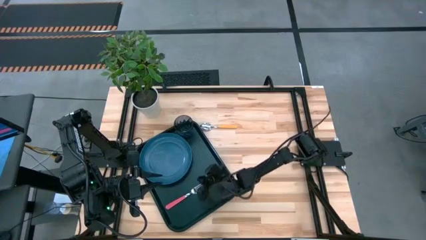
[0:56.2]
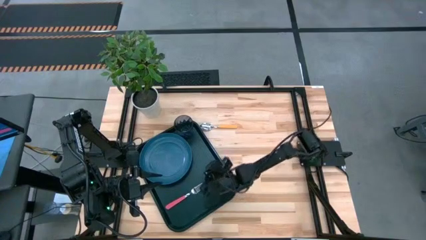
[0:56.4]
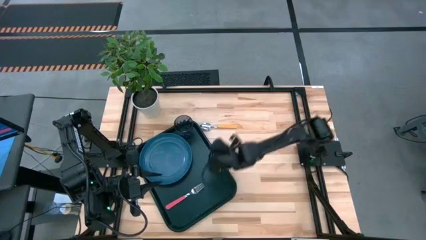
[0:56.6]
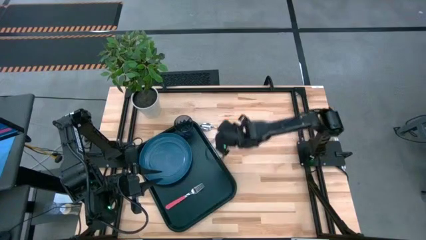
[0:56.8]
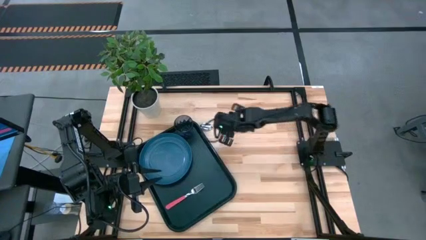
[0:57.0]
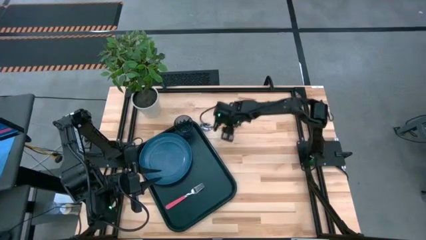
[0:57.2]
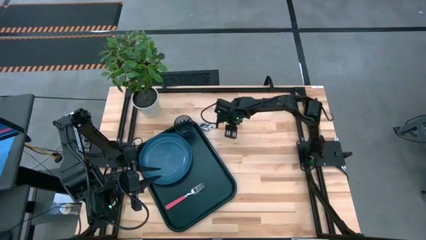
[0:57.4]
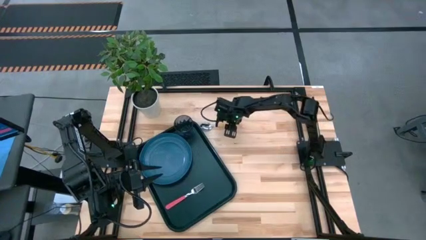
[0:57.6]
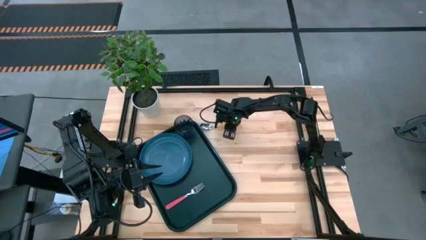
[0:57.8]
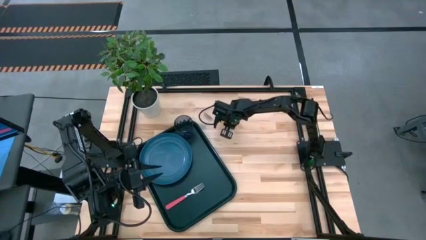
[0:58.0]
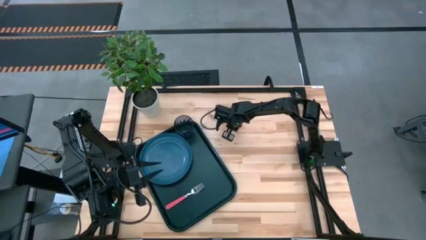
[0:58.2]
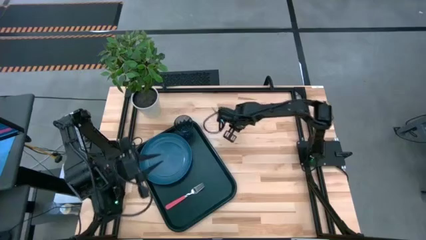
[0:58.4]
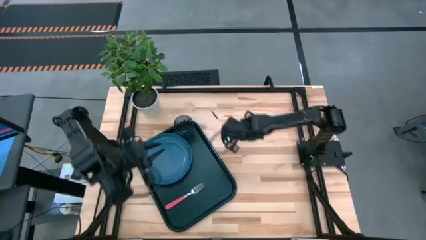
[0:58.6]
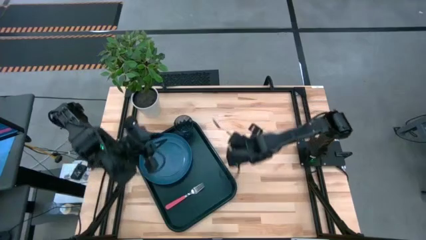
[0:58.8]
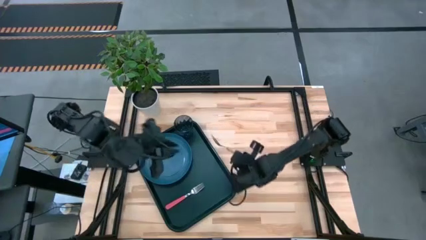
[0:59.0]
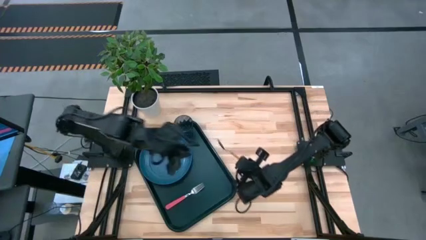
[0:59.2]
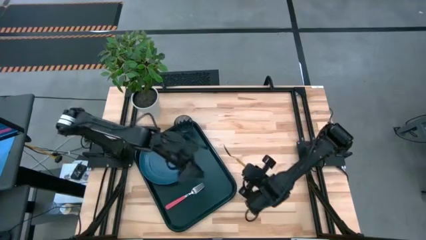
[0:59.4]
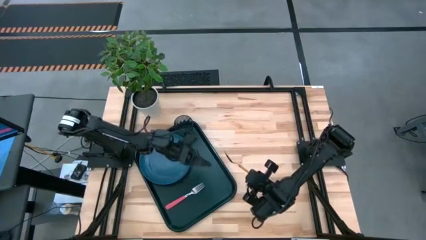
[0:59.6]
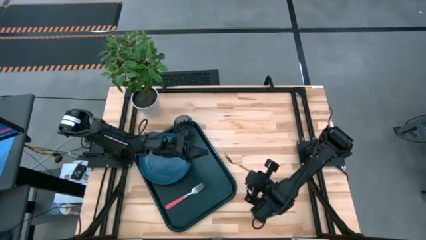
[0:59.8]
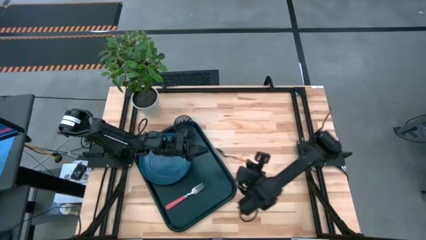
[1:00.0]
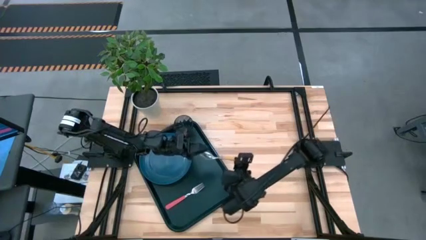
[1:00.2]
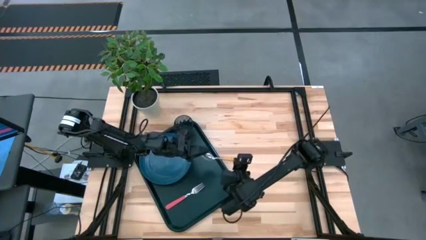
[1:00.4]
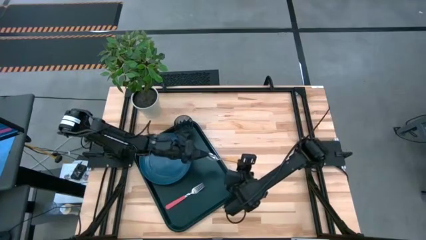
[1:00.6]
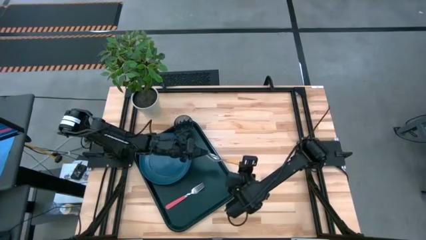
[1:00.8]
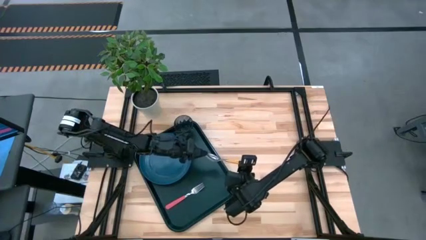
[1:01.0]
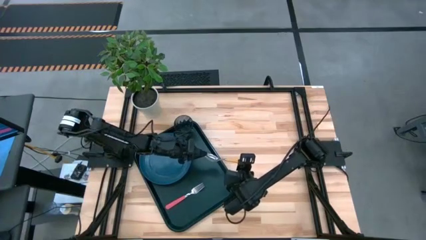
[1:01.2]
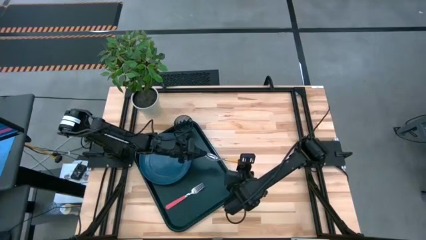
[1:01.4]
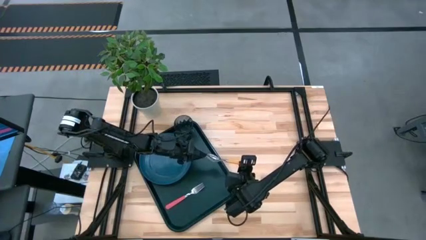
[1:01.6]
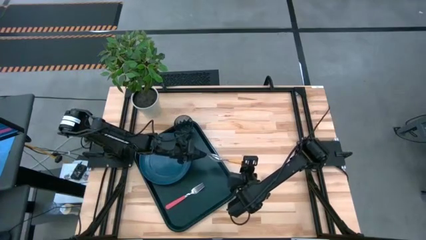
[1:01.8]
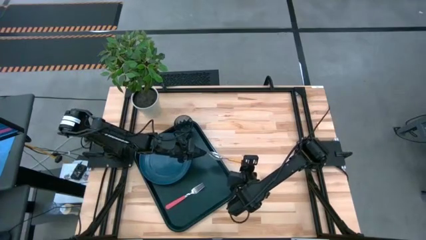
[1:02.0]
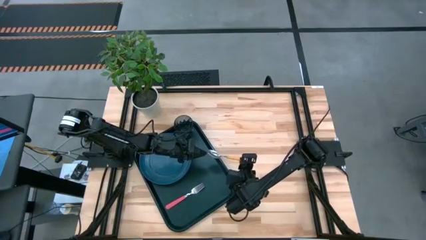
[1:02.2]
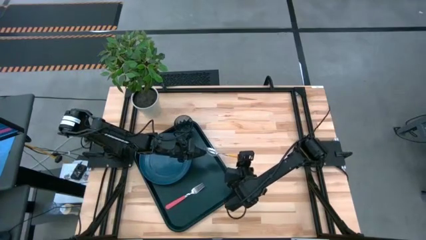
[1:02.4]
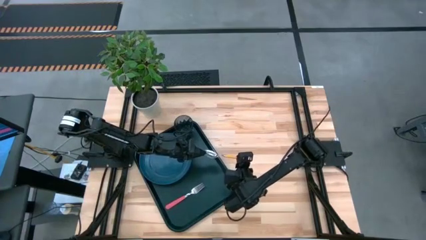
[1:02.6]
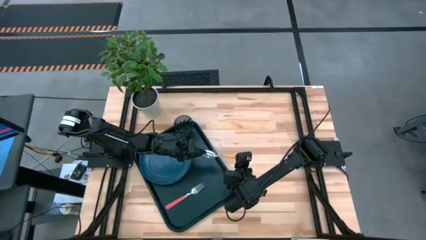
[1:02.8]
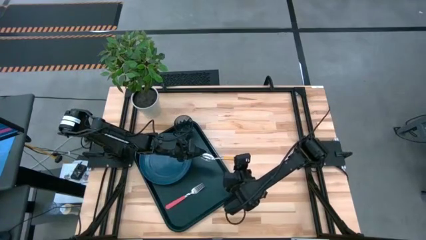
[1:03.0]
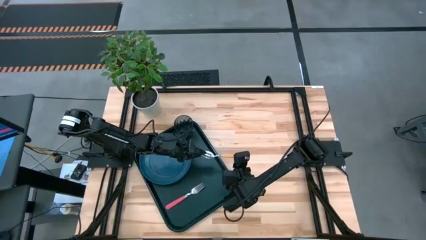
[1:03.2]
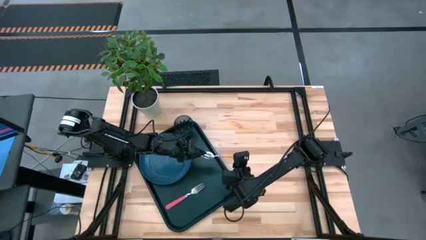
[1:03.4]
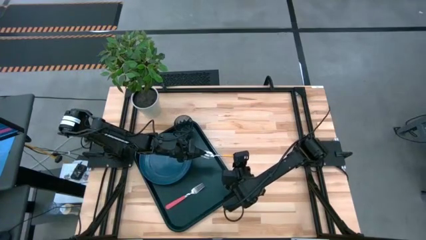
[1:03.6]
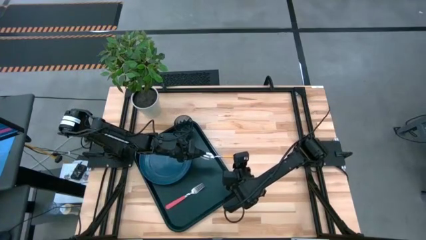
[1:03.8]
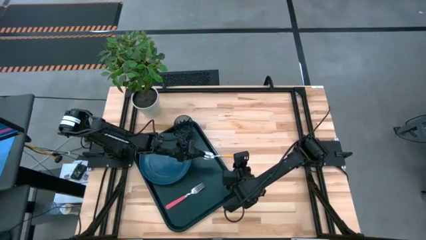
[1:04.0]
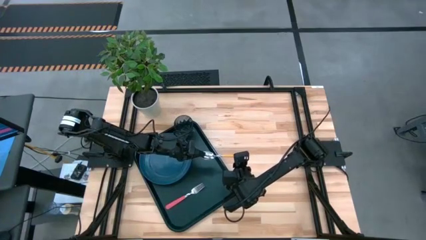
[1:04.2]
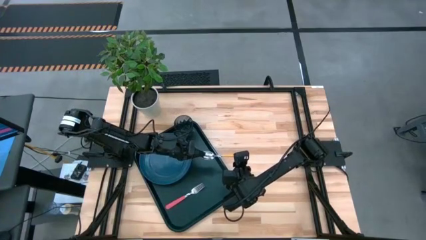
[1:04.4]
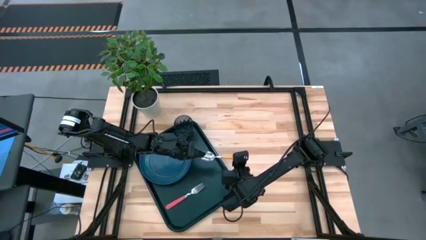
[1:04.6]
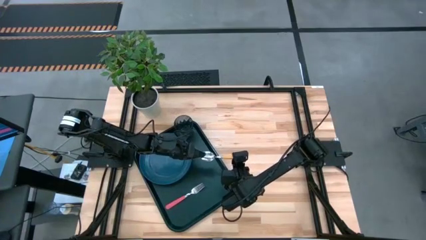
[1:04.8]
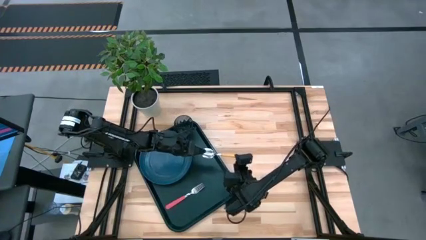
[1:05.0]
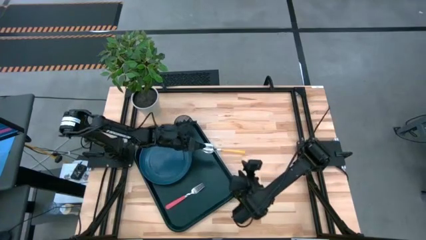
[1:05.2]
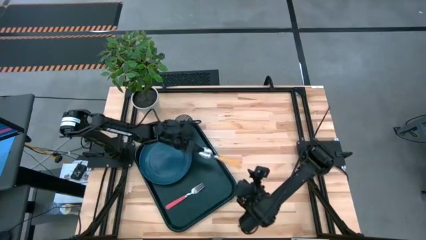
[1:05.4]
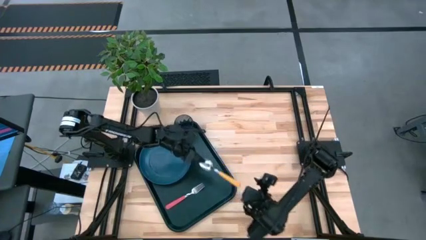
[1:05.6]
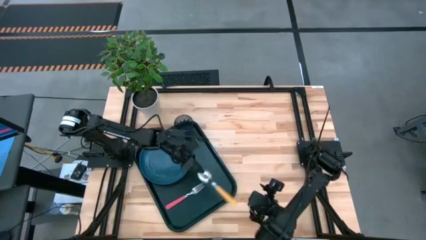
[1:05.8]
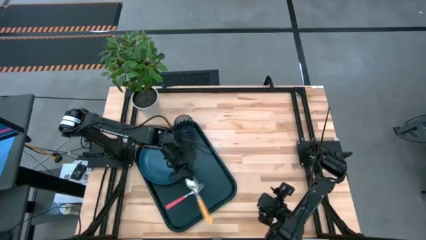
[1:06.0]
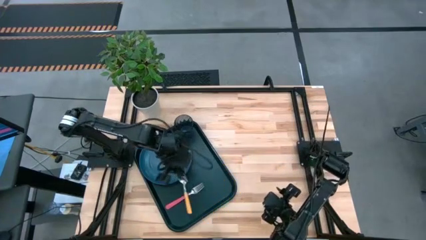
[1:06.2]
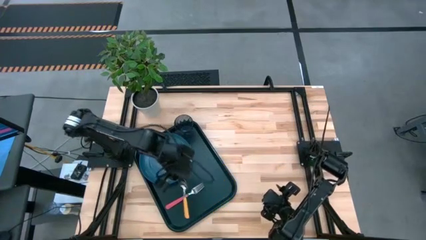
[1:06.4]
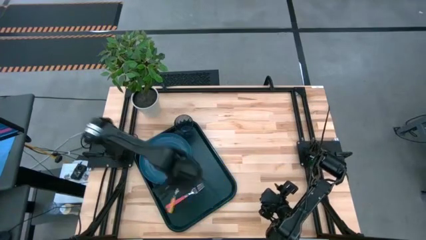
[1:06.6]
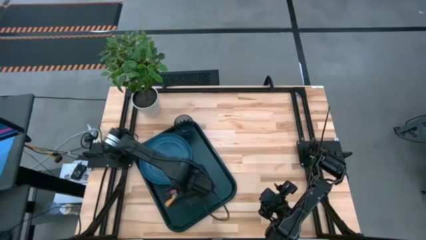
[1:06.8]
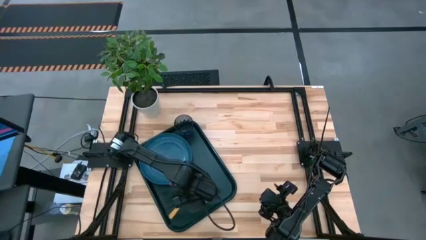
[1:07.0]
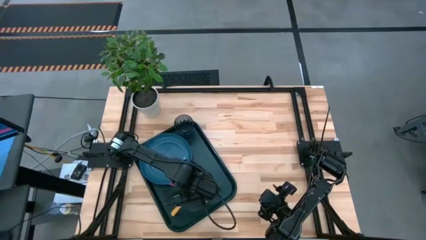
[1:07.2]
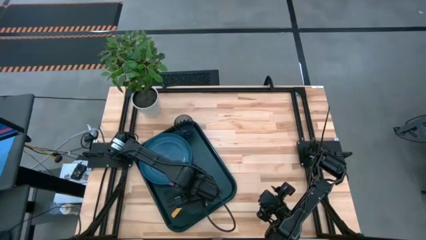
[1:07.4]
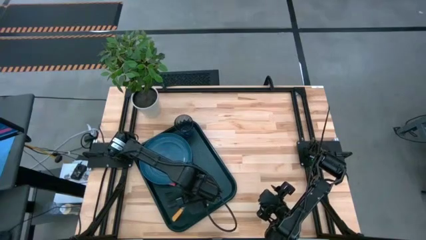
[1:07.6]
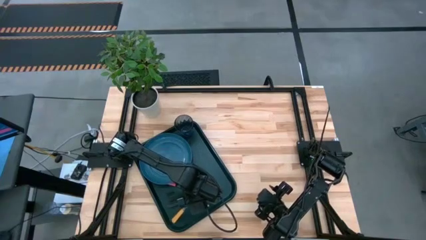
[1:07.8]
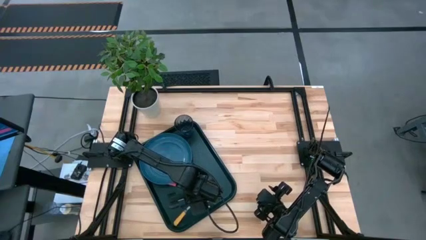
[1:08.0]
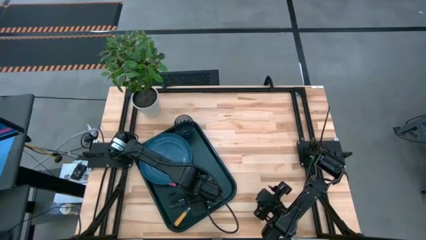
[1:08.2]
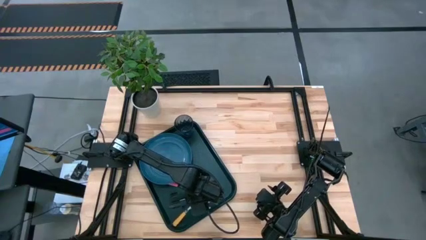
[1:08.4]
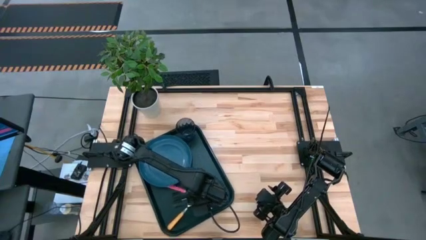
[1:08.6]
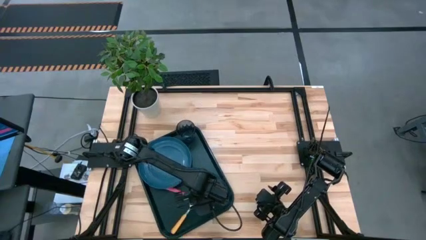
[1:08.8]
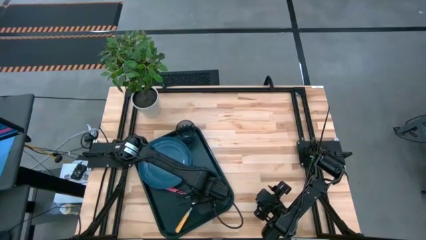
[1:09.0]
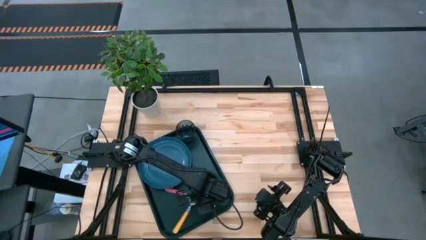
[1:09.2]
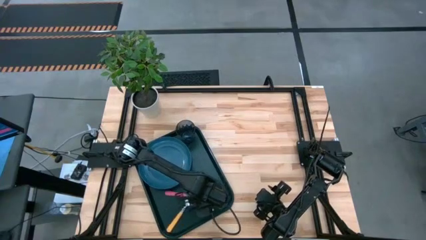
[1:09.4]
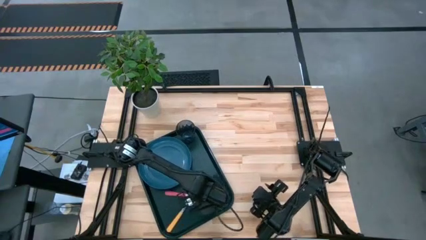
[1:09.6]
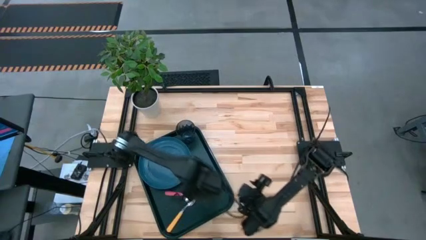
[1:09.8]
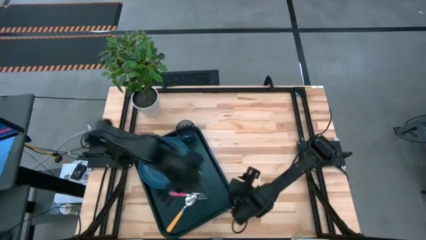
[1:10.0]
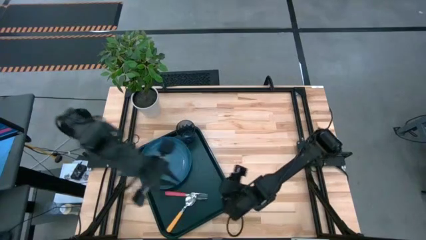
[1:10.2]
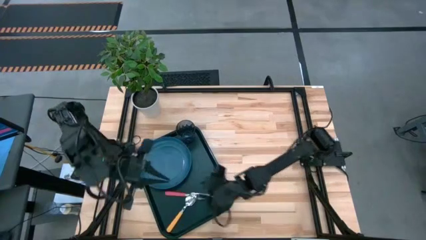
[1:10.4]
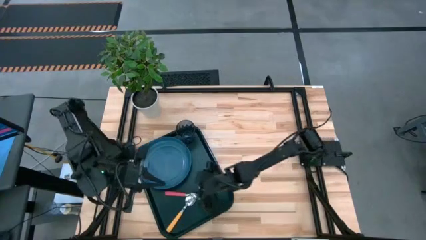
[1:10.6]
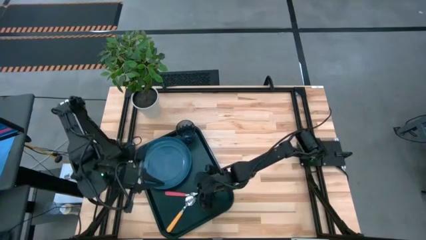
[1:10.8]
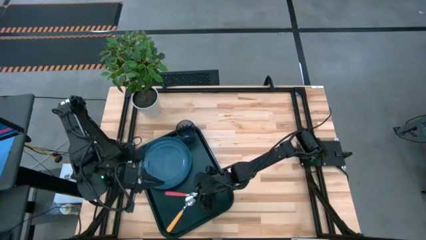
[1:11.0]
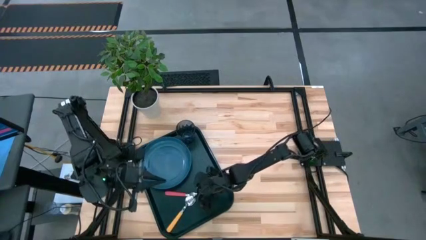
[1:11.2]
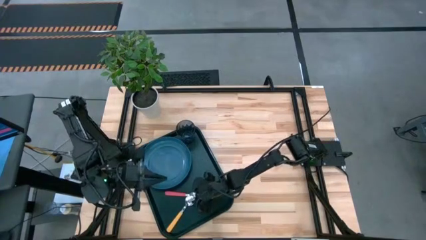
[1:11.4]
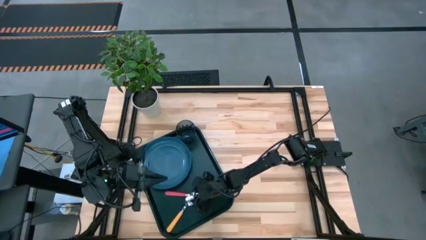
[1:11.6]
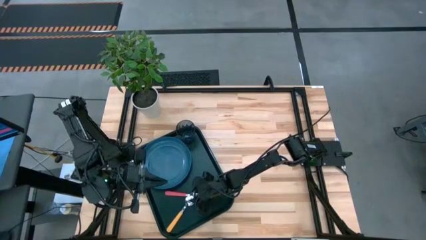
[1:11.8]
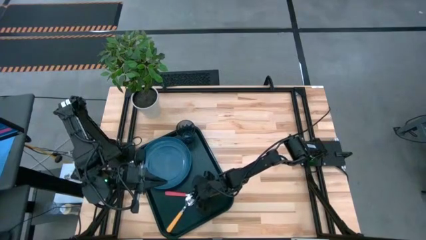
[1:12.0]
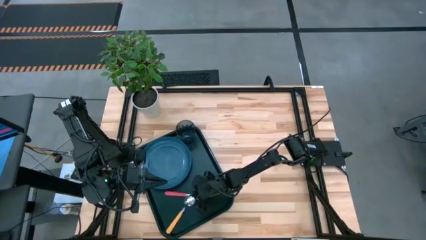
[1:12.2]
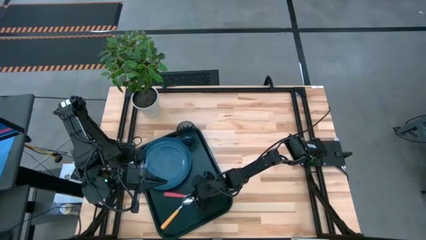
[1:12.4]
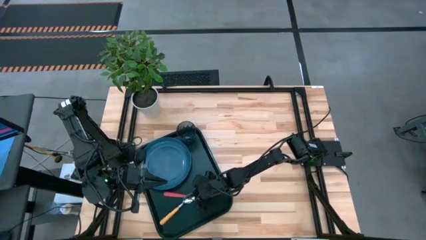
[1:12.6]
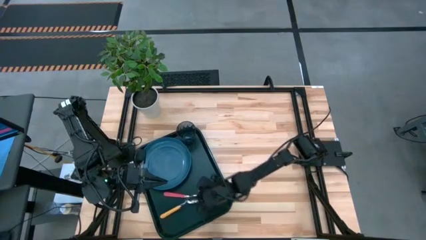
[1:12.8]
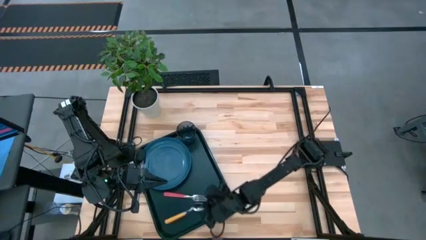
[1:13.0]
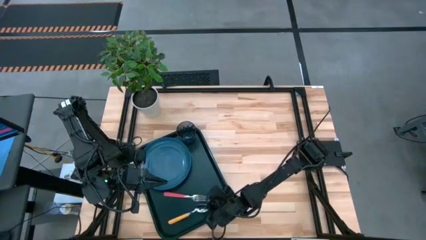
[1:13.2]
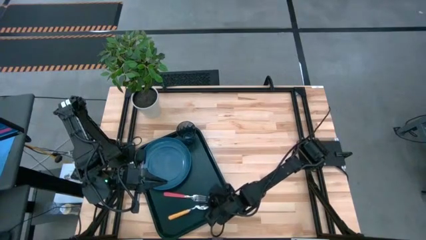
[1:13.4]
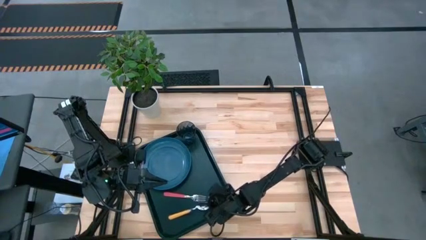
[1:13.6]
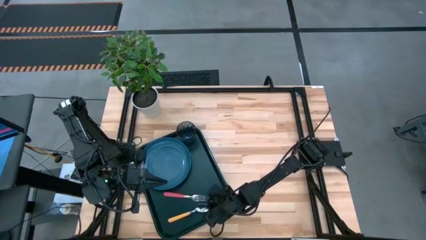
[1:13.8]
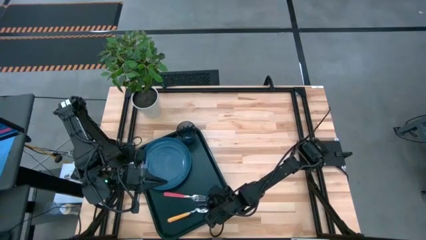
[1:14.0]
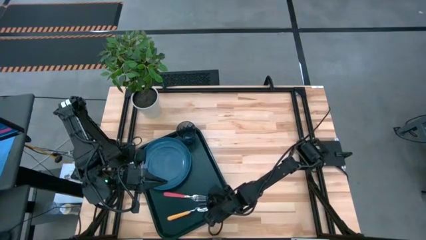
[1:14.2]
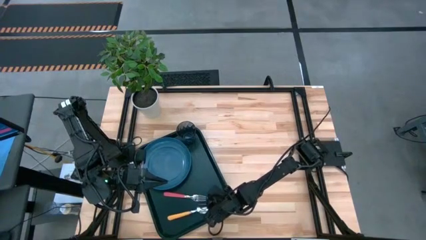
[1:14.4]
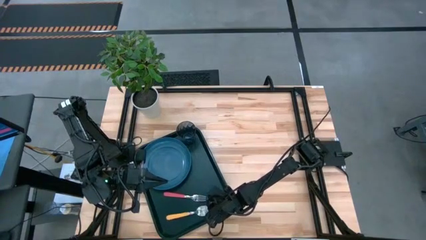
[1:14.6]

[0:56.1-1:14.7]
Task: Pick and place plate/cup/fork/spoon on tray
Put the yellow spoon on the black tray on the right of the pink fork
